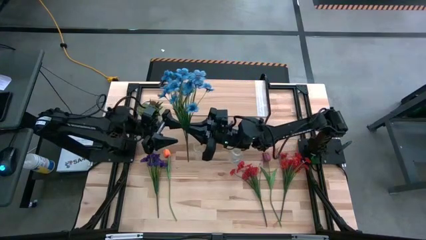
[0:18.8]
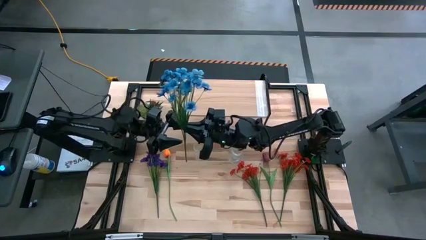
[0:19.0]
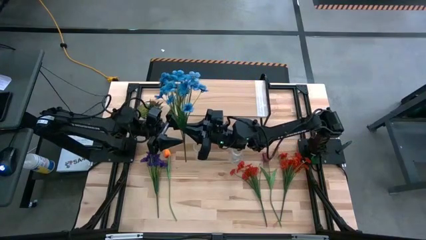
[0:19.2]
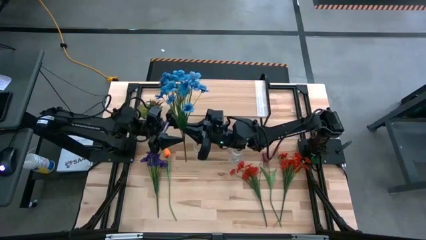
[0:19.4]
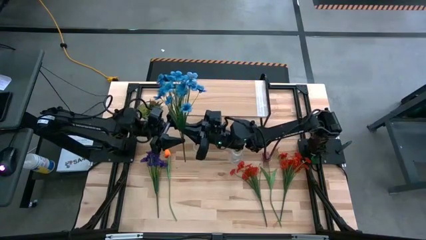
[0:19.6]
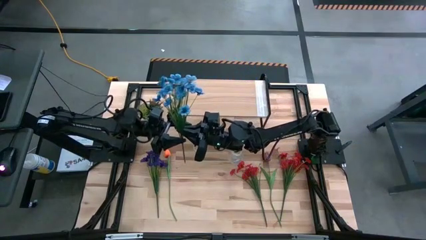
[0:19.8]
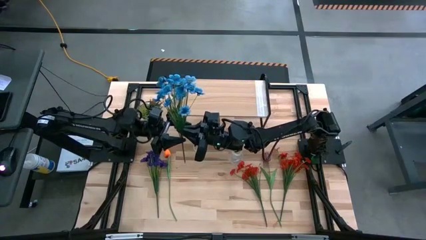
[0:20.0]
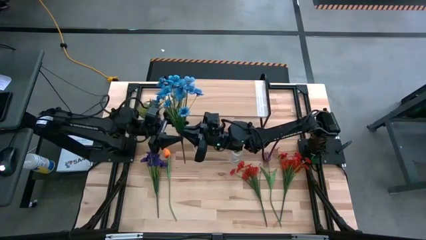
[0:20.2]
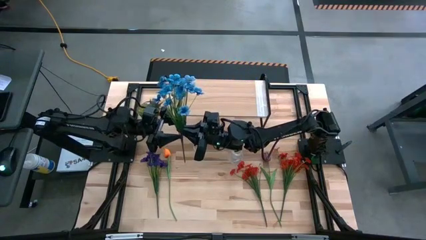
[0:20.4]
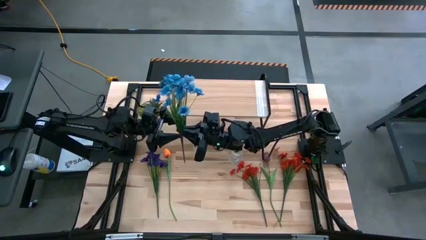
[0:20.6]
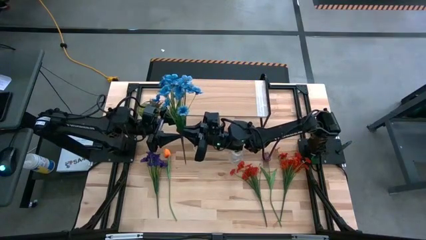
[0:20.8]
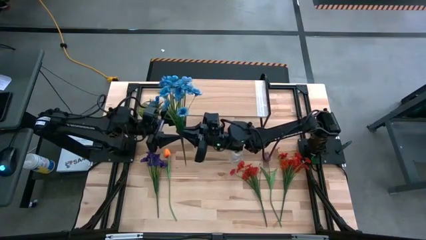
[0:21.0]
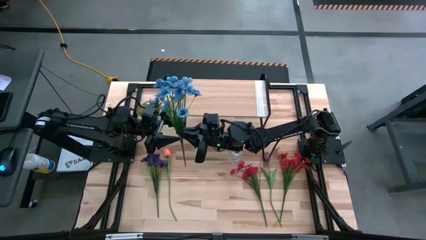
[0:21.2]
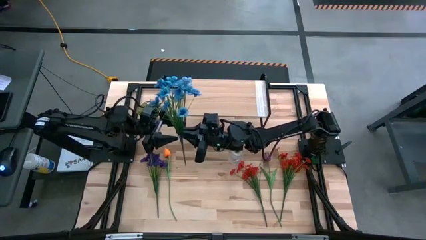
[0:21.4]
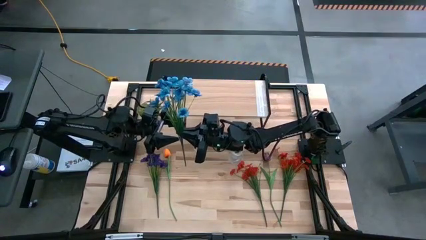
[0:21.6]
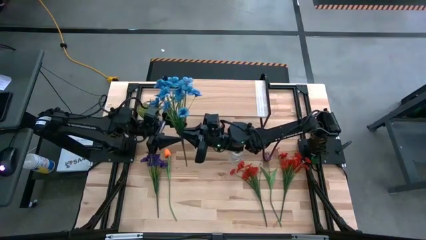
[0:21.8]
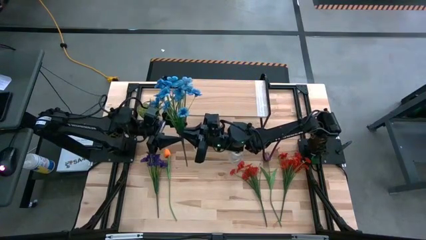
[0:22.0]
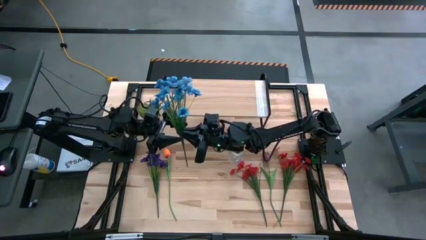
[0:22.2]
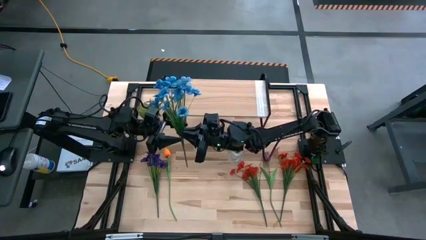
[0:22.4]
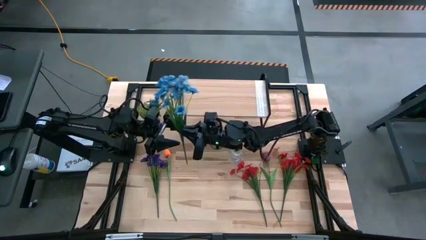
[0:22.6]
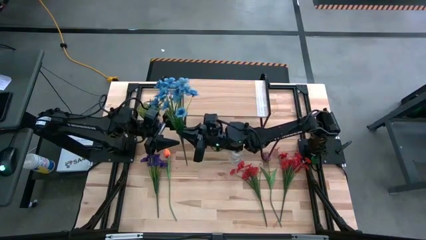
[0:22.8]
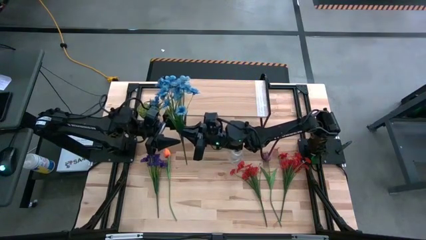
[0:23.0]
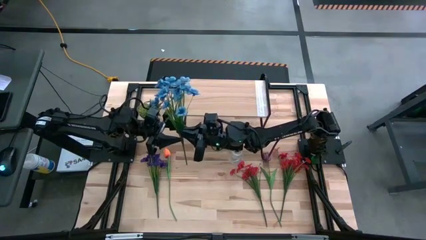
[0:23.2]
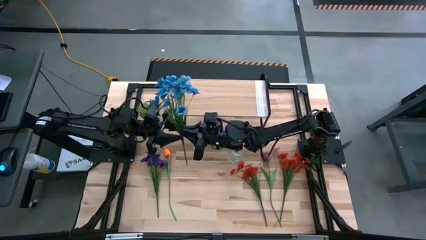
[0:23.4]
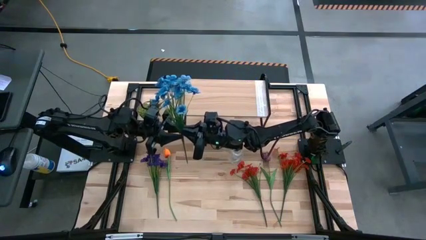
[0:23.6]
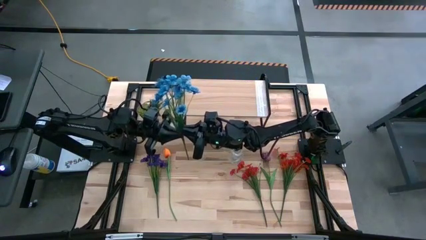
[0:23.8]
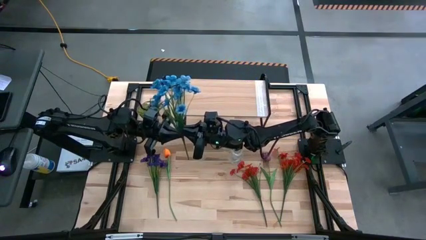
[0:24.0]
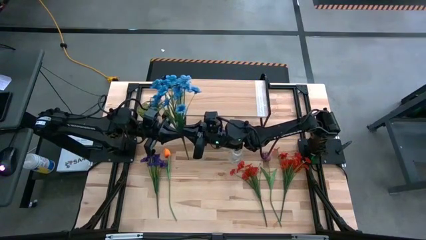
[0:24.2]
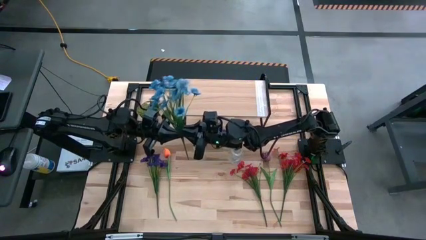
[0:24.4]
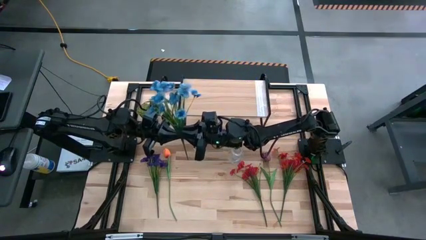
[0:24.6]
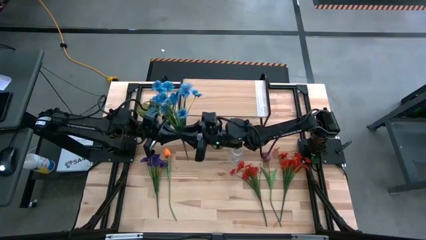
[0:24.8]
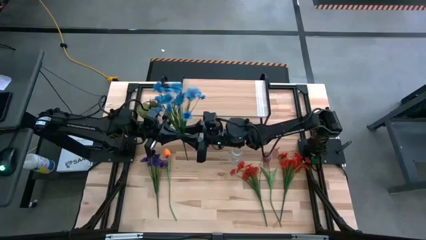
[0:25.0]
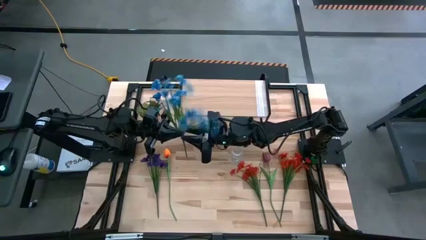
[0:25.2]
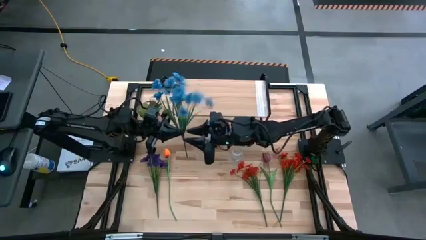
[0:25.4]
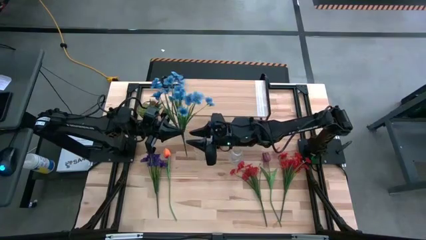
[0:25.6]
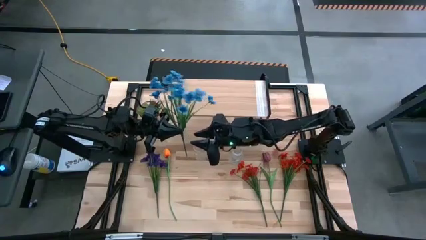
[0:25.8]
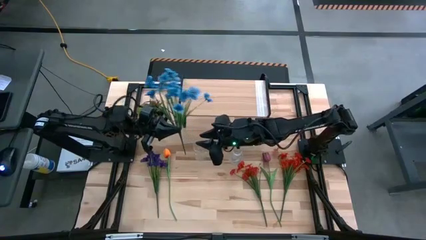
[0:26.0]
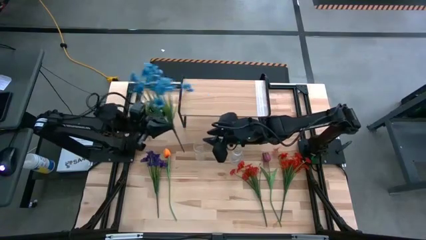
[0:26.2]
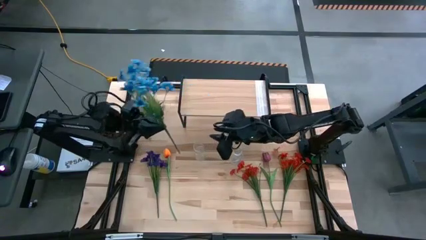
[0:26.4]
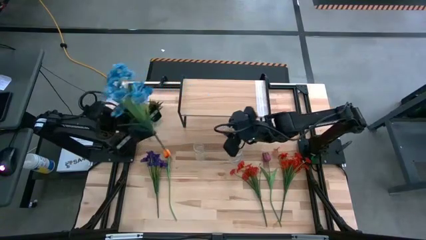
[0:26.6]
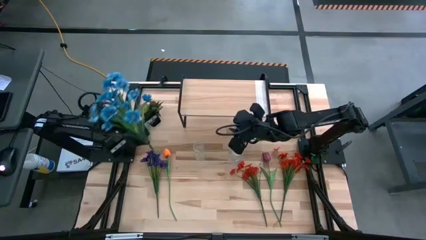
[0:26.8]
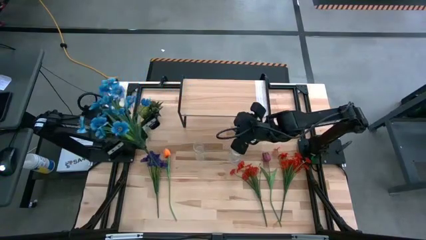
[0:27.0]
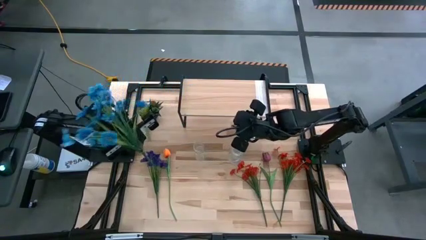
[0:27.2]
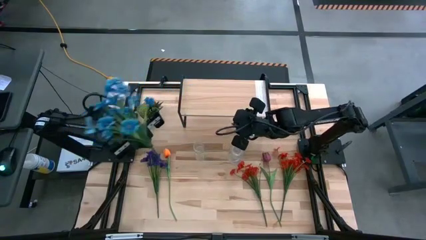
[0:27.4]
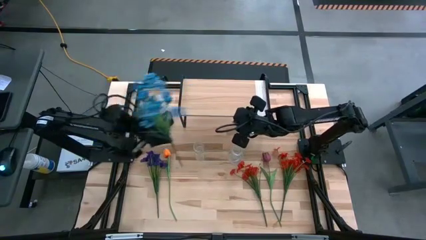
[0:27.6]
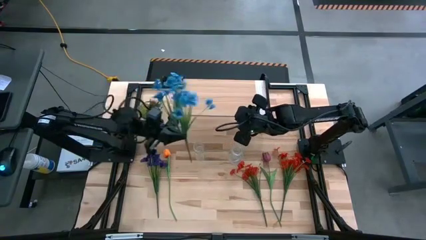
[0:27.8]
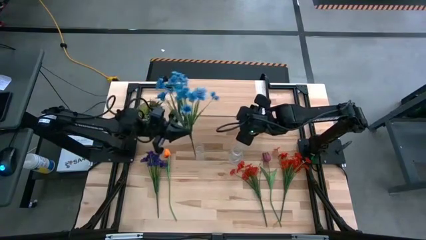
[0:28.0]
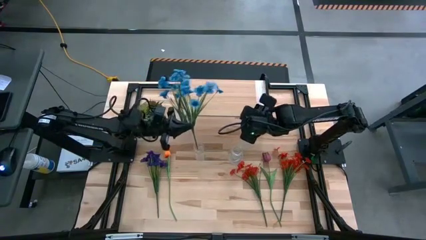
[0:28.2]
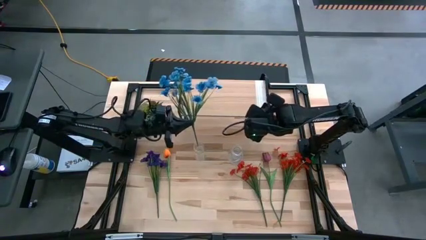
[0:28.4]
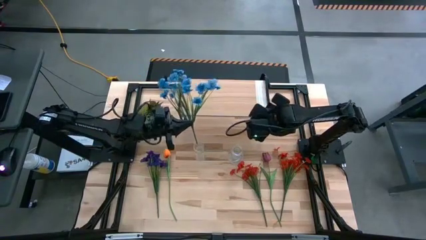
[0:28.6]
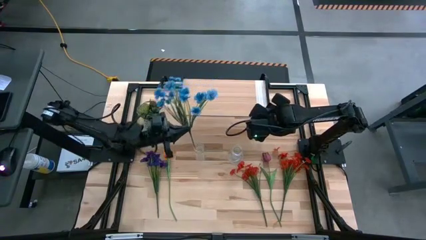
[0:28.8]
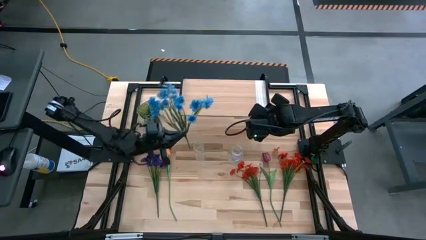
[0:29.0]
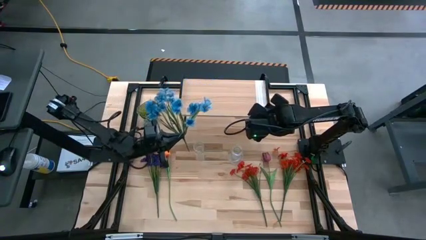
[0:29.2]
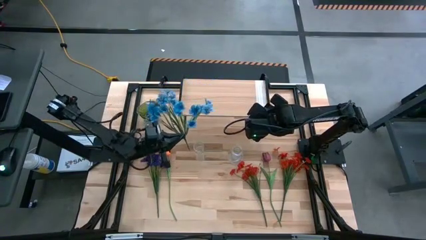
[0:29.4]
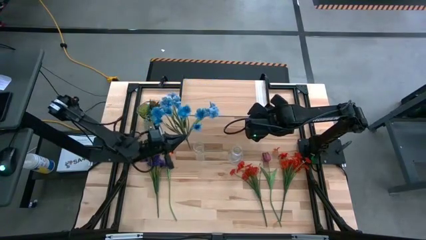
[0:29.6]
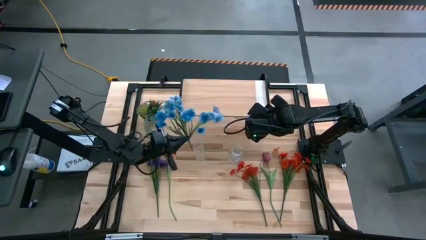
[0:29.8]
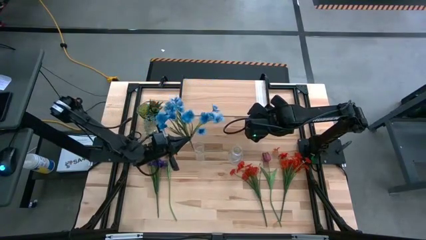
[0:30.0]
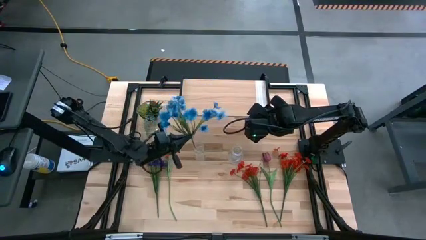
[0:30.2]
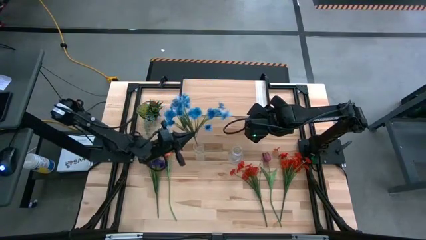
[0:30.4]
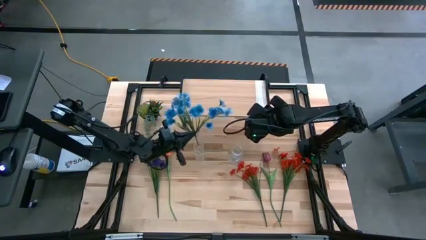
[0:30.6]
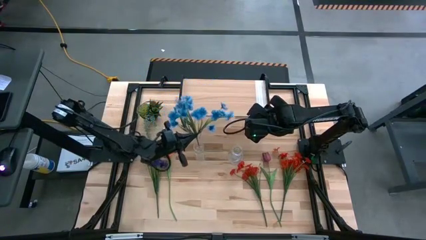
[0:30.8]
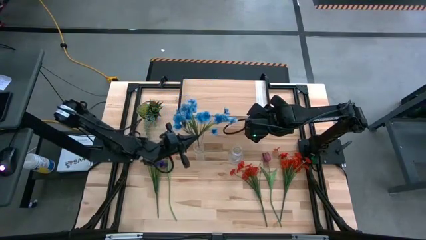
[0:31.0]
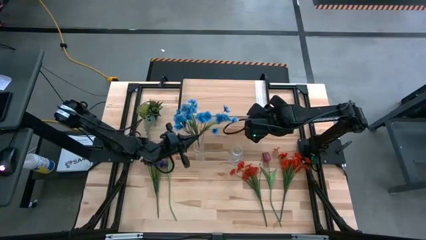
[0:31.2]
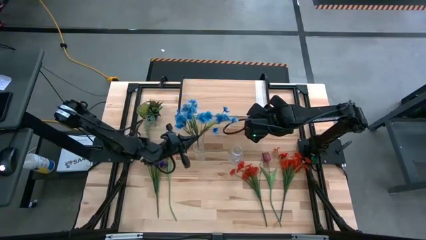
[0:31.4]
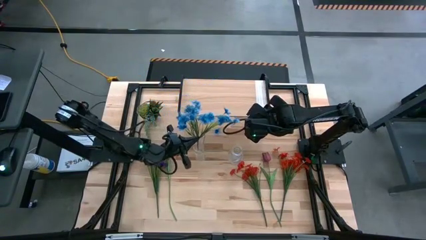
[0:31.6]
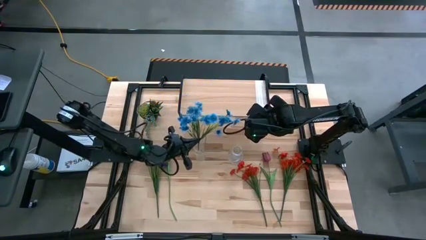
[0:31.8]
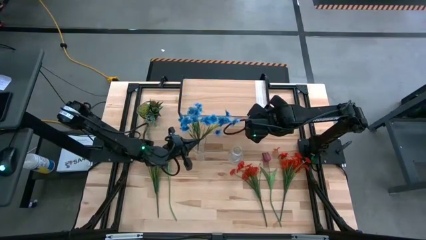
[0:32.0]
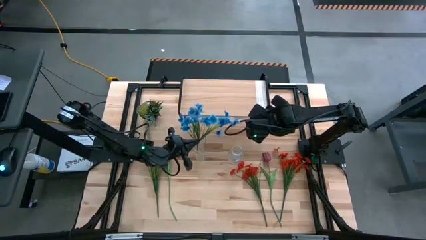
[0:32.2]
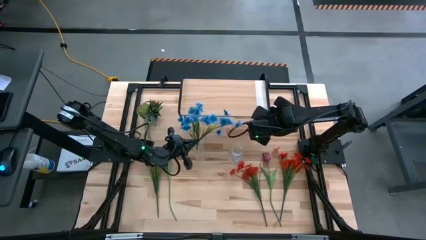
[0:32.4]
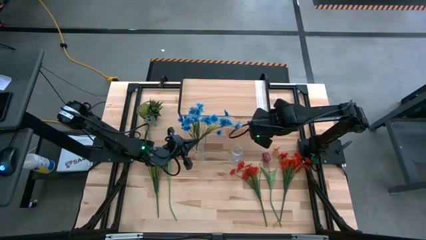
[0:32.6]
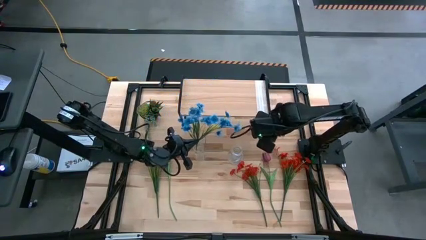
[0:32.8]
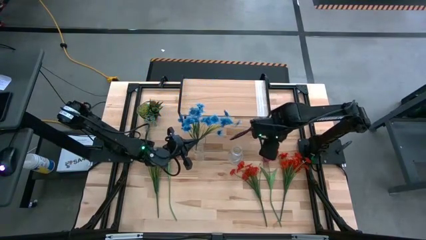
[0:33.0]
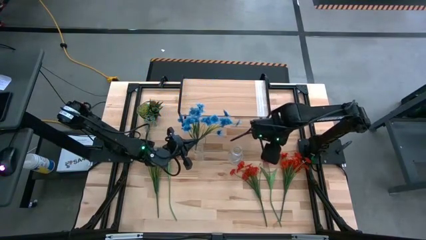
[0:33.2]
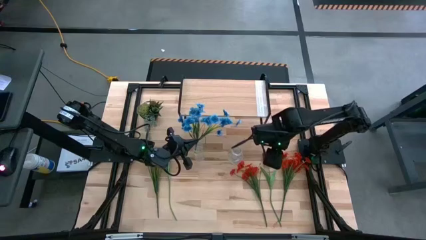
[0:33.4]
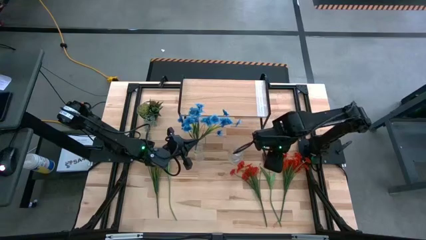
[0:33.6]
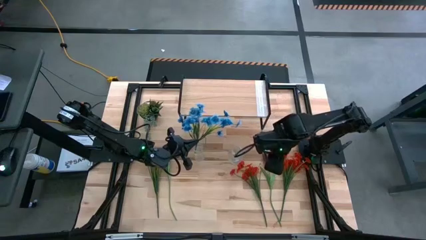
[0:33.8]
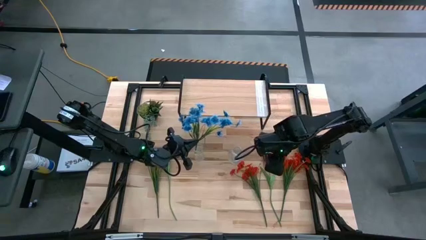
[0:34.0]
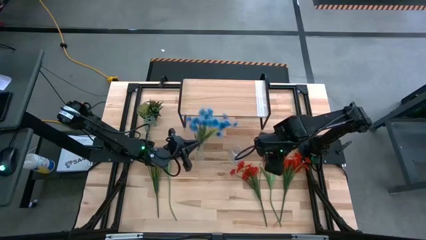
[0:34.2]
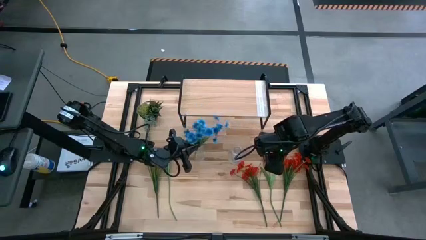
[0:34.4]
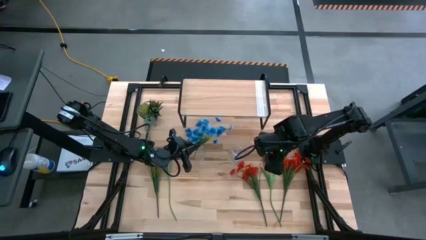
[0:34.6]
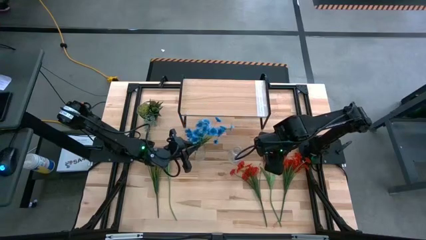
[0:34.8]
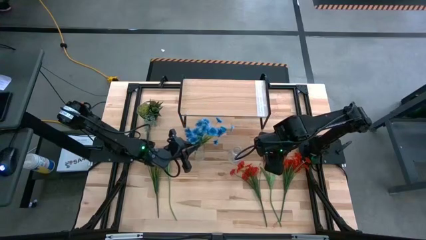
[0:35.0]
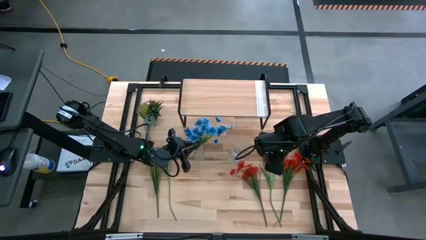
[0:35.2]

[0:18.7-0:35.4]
Task: Pick and place flowers into a vace then onto a shelf
Put the blue flower into the left transparent crystal vase
